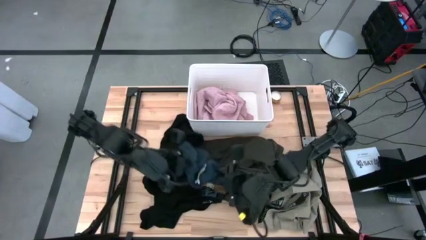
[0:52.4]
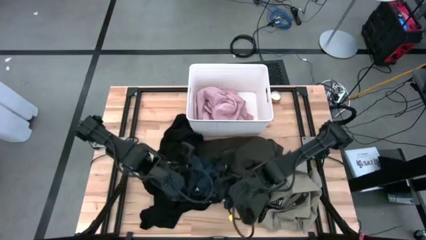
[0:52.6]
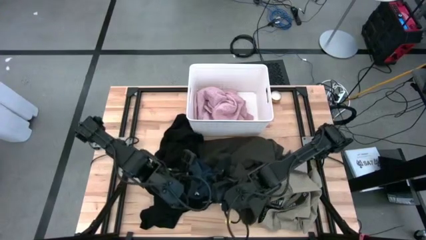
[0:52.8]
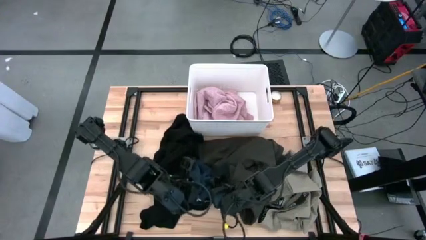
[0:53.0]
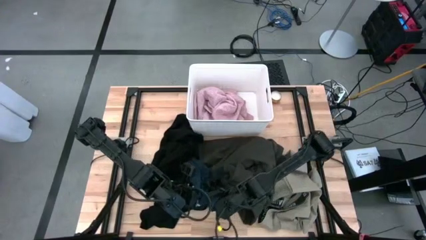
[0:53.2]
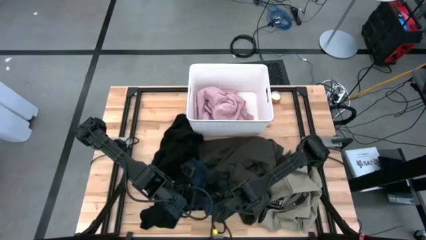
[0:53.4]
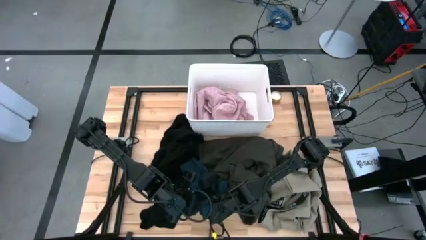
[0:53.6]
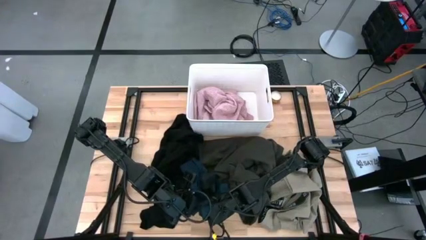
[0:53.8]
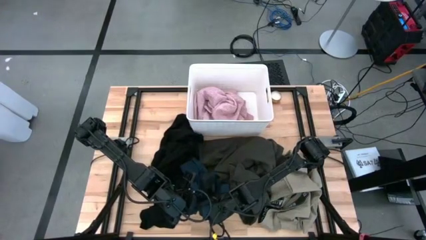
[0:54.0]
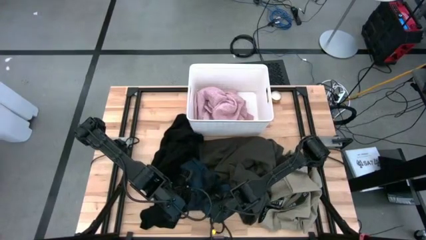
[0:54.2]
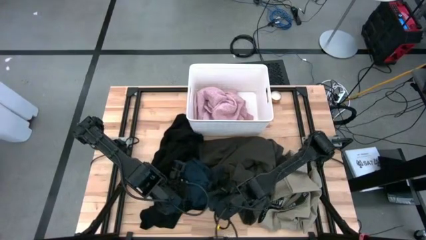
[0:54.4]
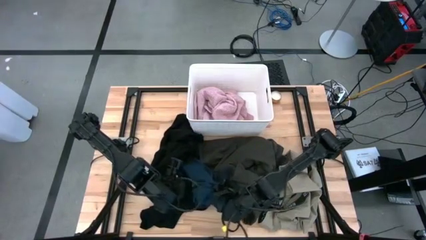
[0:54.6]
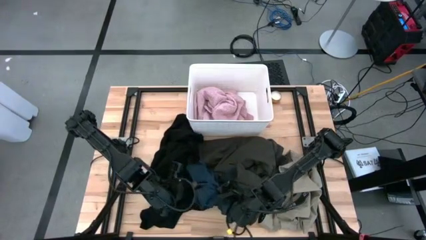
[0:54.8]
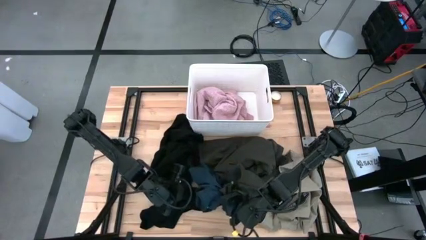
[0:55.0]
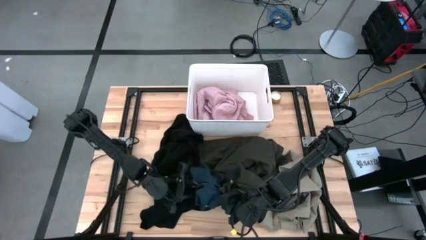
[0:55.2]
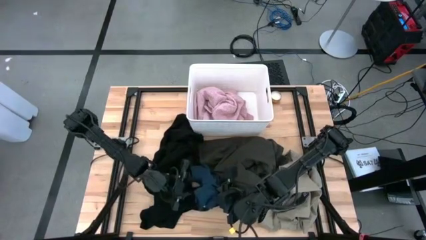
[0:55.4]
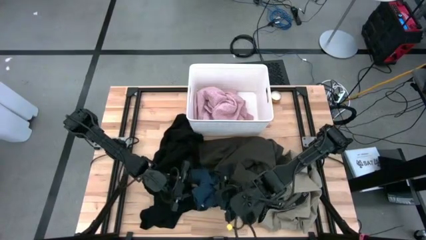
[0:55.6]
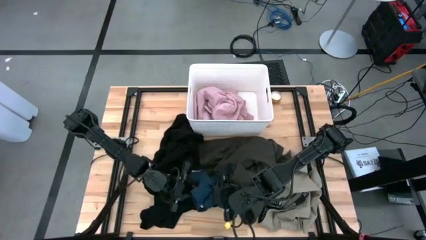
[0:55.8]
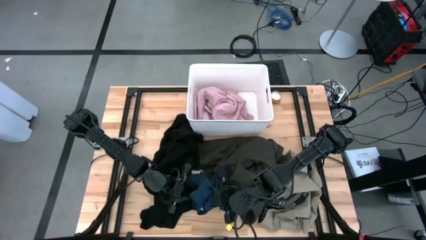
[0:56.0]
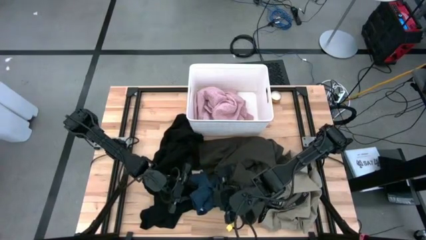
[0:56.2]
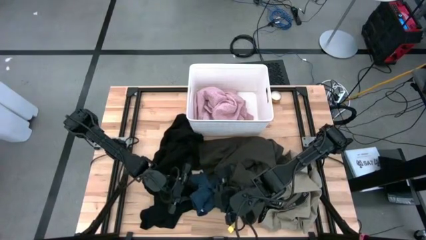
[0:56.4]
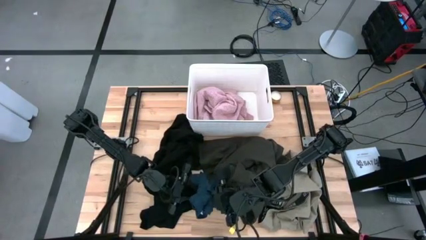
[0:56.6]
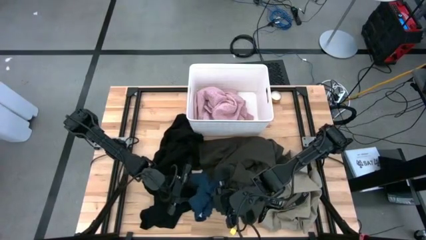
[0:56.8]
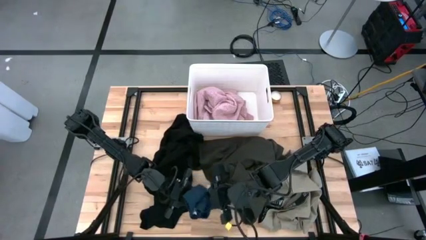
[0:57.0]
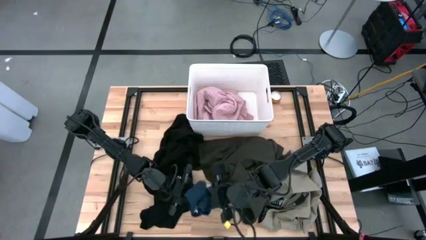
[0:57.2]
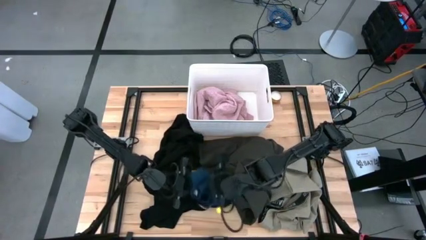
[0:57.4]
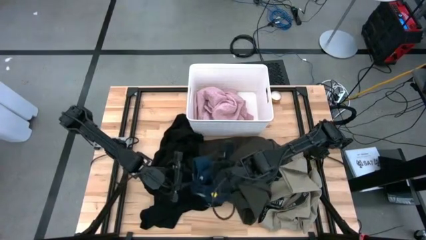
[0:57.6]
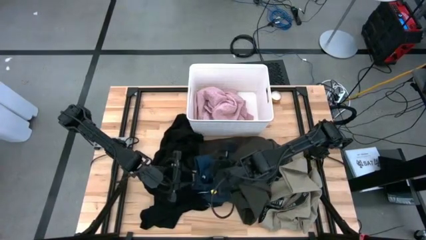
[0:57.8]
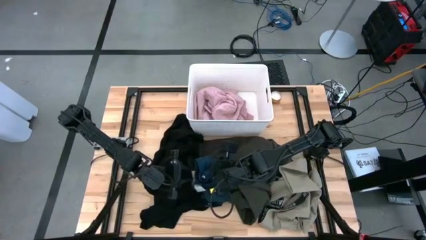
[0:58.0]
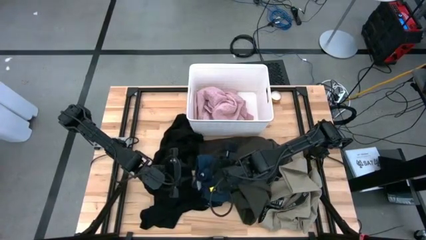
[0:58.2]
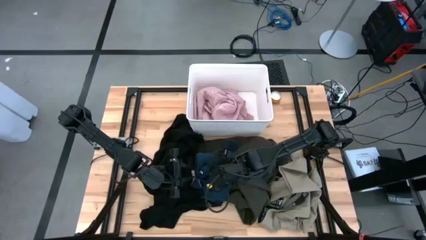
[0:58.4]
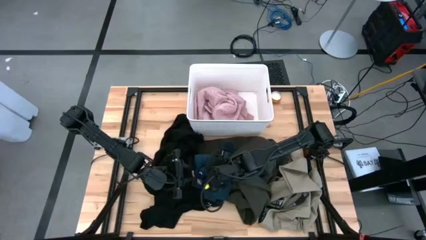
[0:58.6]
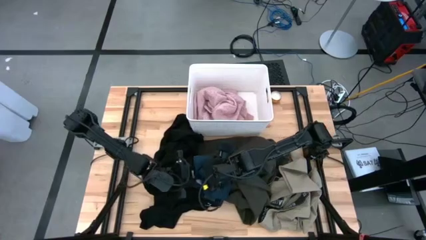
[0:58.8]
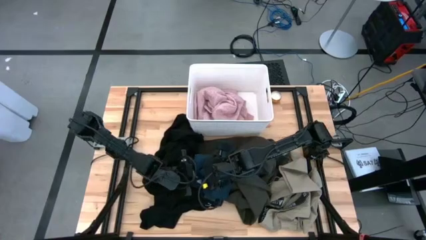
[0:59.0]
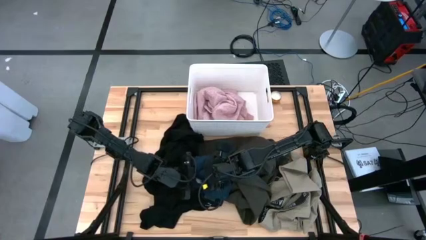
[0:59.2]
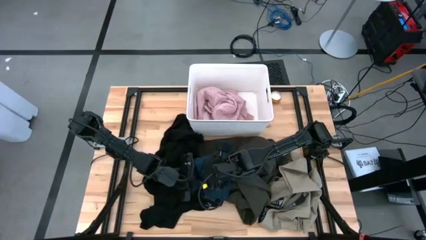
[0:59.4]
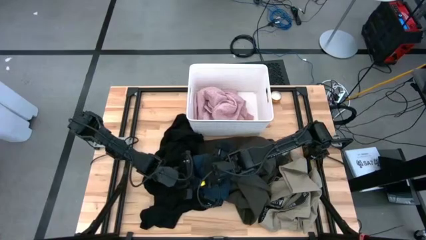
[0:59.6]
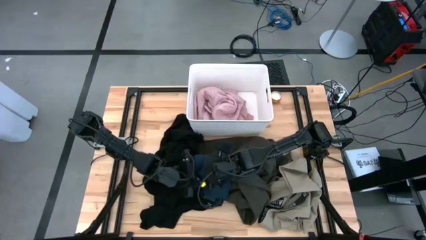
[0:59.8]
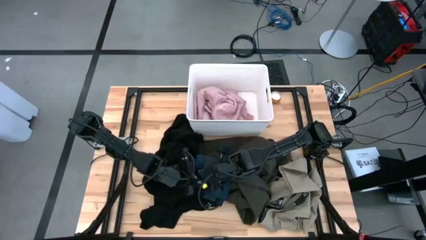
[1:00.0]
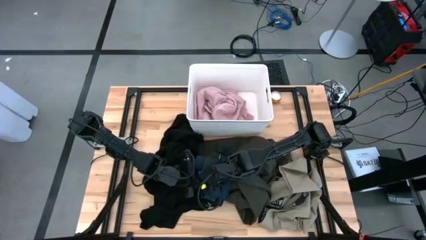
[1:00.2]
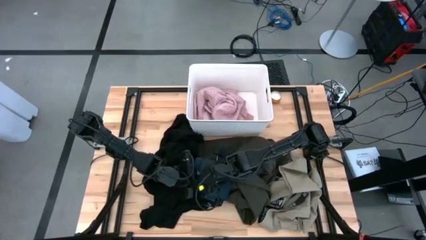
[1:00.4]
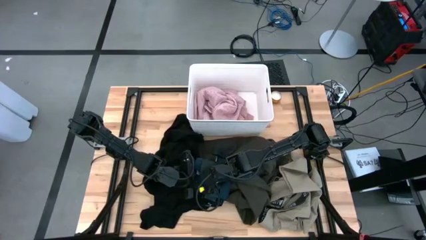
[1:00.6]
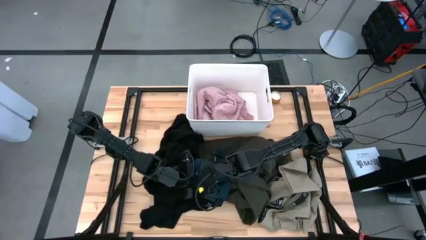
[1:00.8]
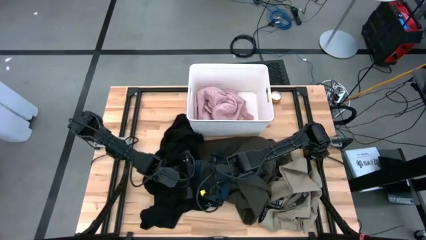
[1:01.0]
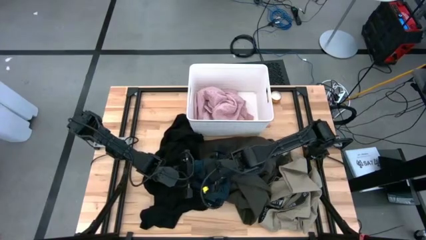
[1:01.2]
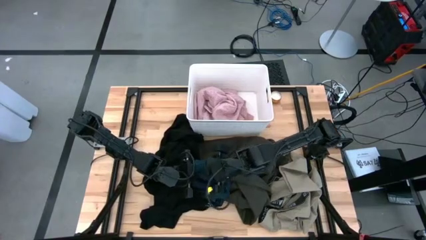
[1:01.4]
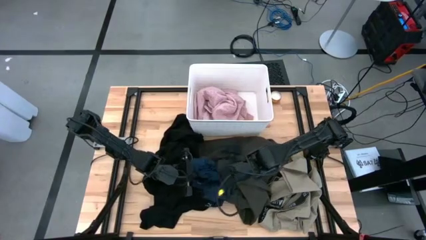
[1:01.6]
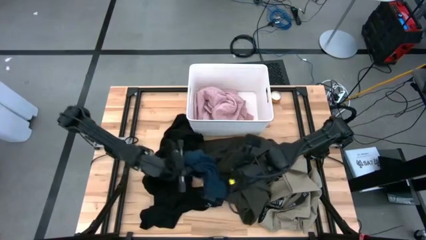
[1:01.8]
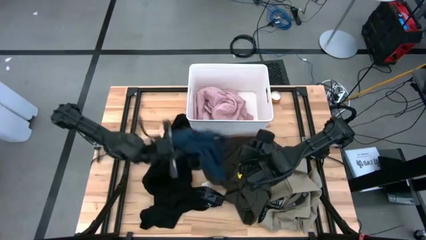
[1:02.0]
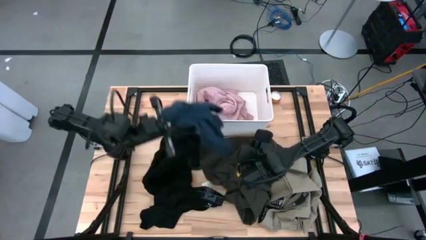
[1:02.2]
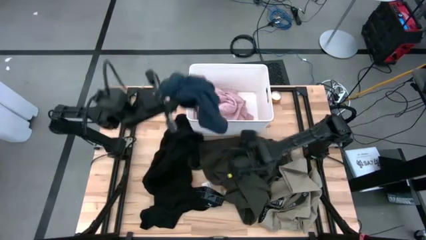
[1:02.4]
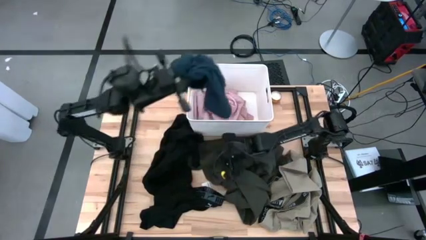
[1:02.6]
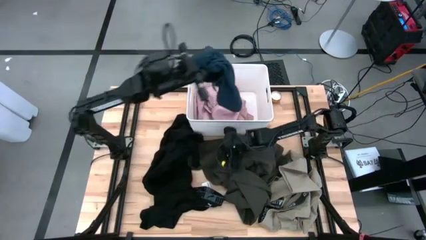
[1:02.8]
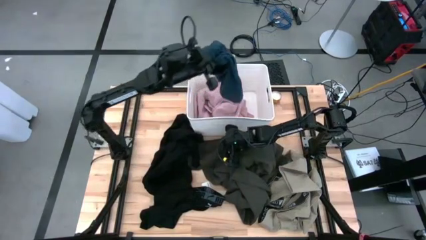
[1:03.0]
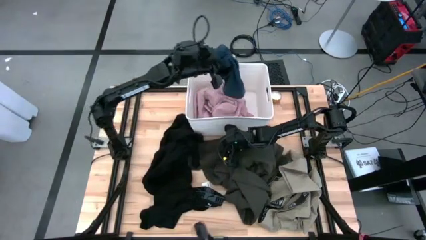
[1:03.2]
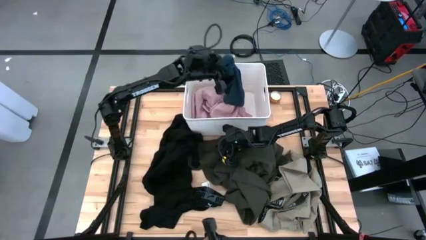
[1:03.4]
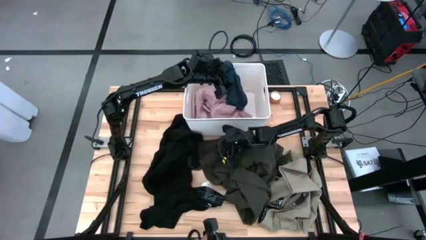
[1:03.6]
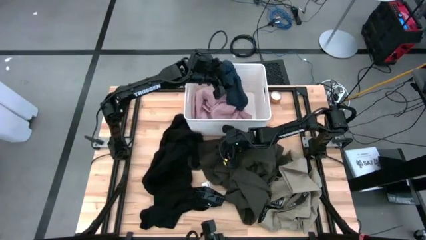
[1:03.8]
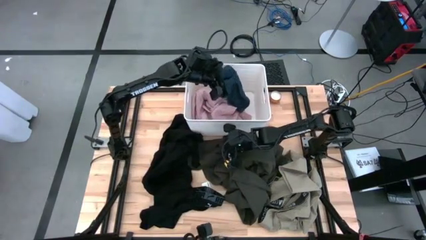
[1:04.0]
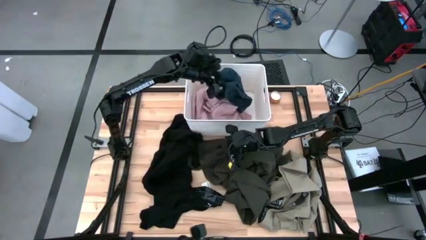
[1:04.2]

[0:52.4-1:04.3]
Task: Sort clothes
Put the dark blue shorts into the white bin

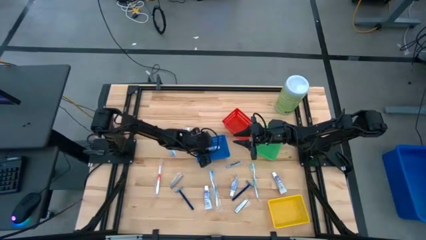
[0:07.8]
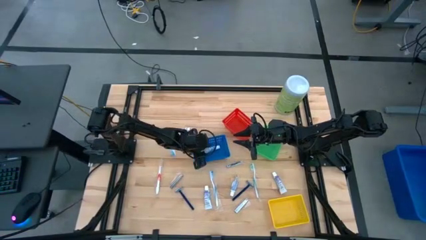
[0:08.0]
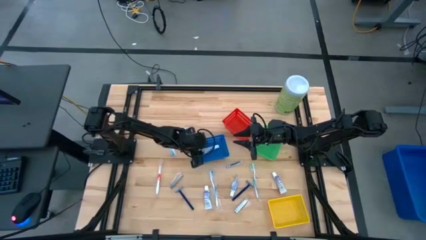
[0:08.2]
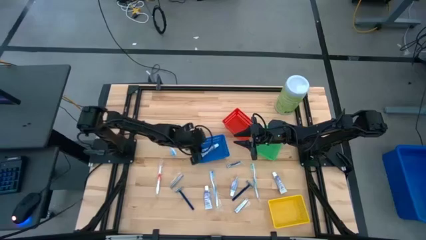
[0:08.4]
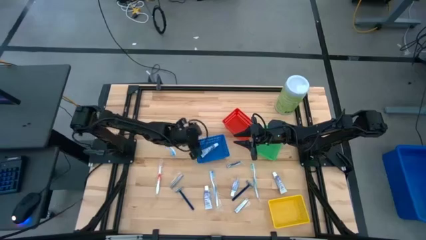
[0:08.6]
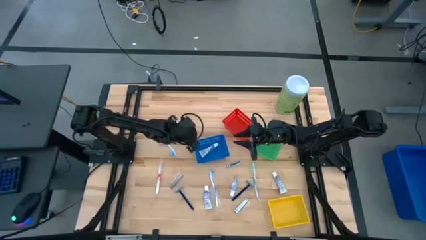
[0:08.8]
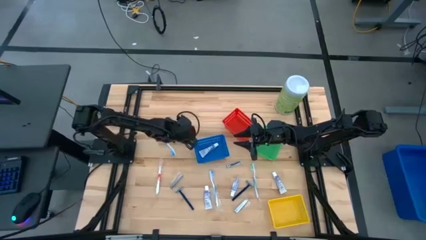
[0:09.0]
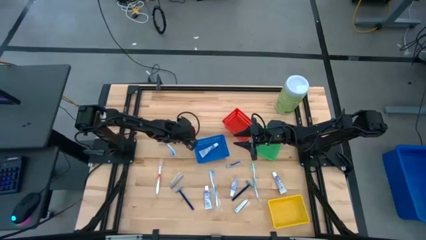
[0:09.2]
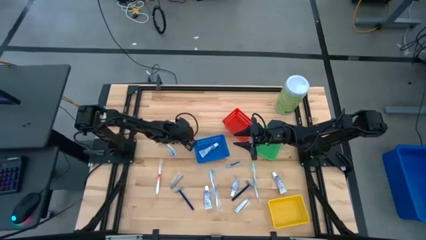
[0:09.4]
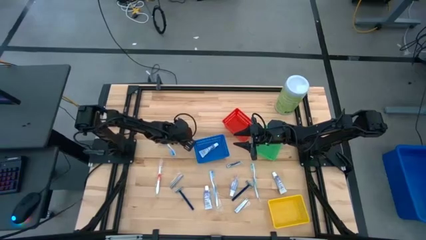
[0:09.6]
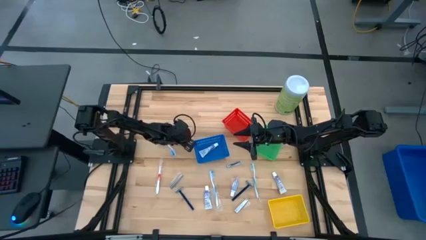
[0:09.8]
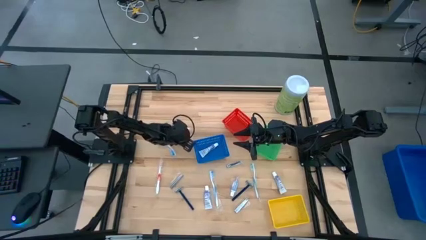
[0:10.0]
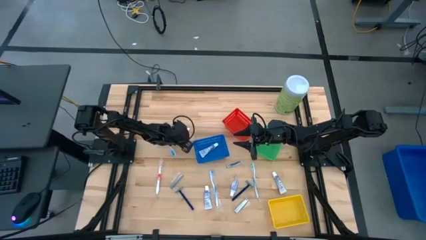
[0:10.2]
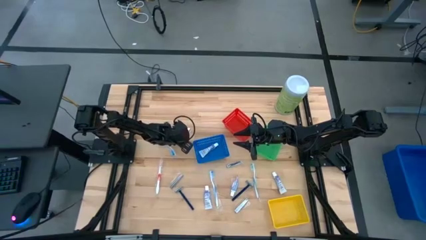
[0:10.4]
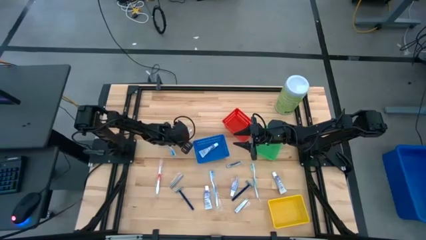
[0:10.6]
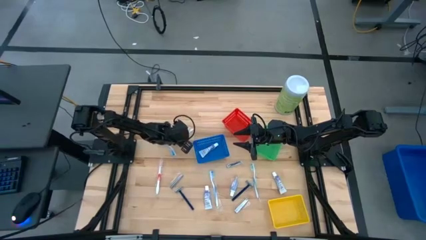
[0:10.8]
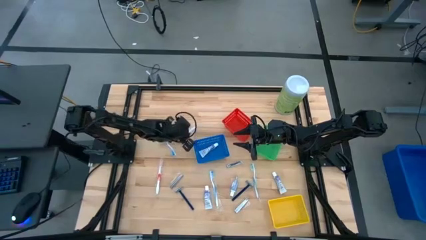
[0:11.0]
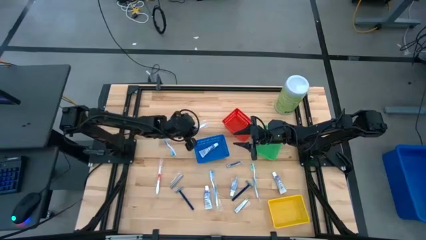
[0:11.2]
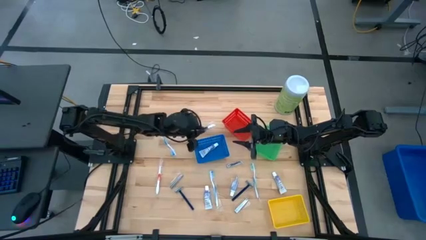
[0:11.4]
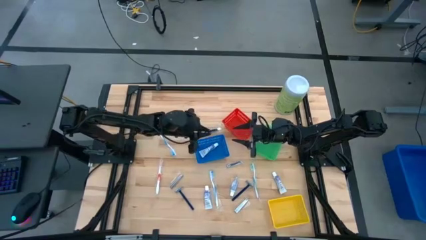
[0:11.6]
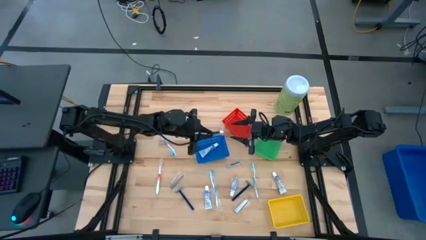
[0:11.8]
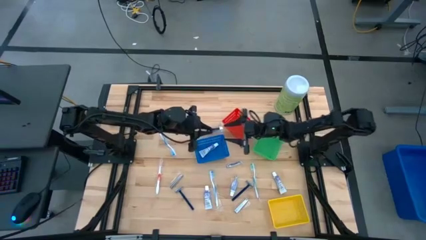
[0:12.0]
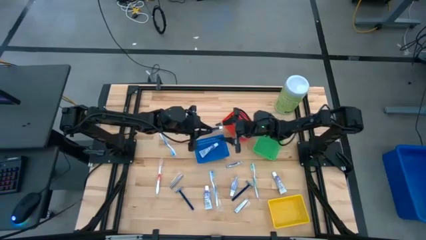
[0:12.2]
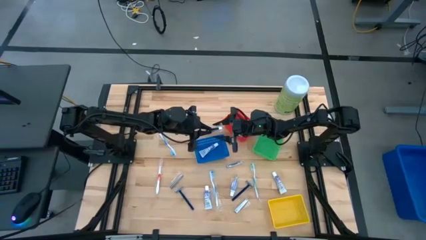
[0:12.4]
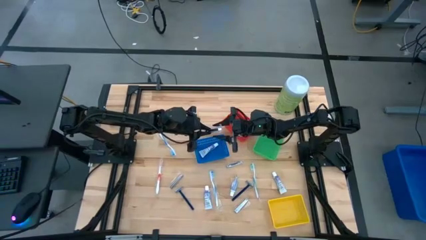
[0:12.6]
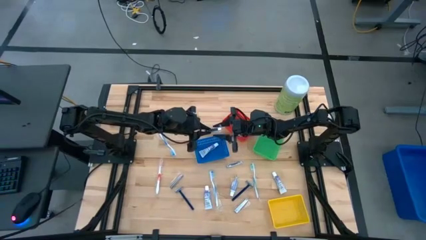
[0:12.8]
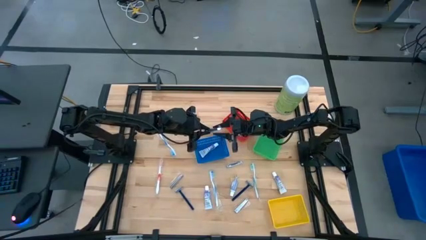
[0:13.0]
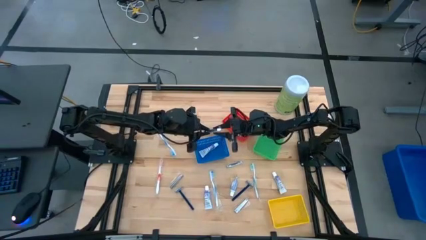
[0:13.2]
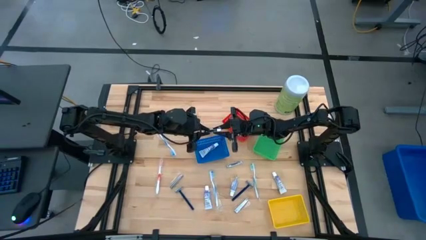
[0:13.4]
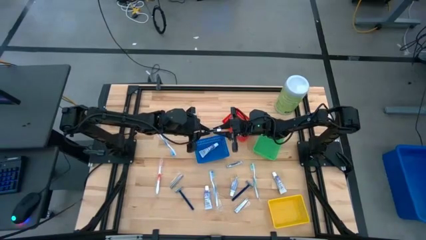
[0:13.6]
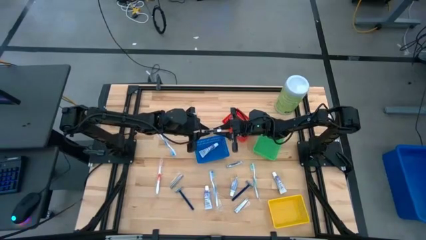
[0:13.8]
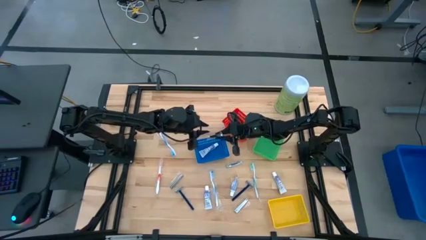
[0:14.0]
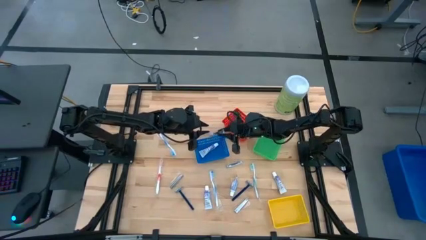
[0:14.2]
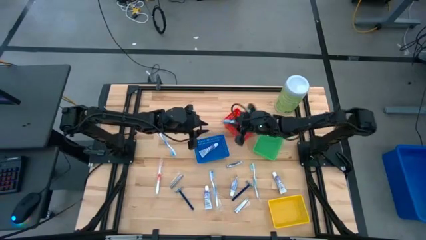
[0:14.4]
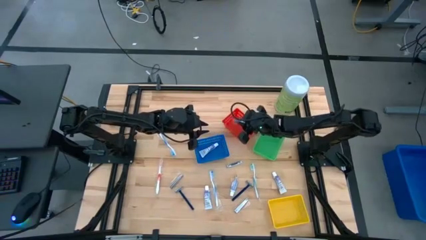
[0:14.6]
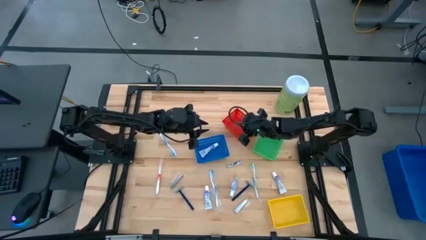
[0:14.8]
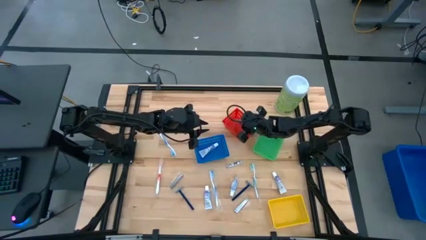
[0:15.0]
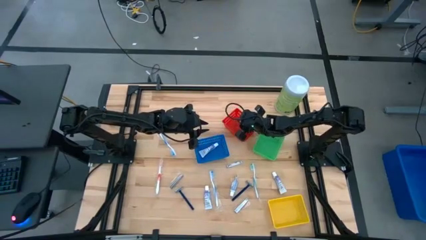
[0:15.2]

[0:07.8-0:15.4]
Task: Pick & Place Travel size toiletries
Put the silver nail cutter into the red bin
